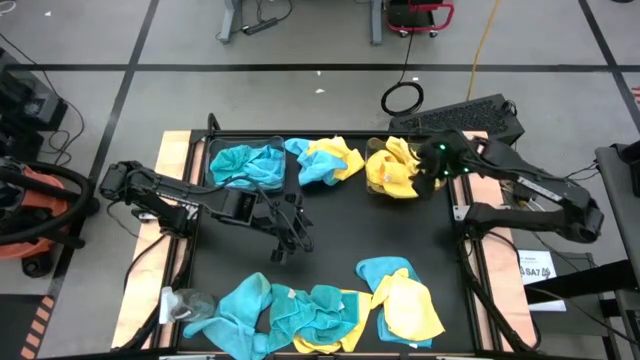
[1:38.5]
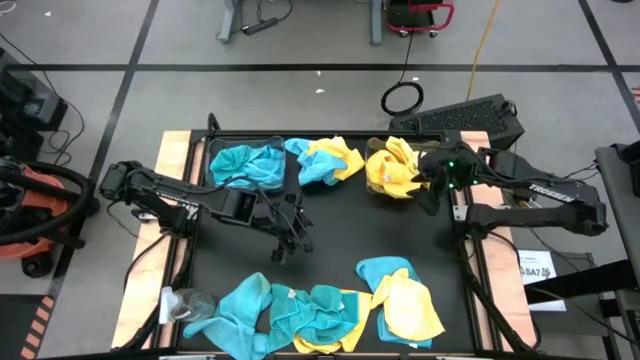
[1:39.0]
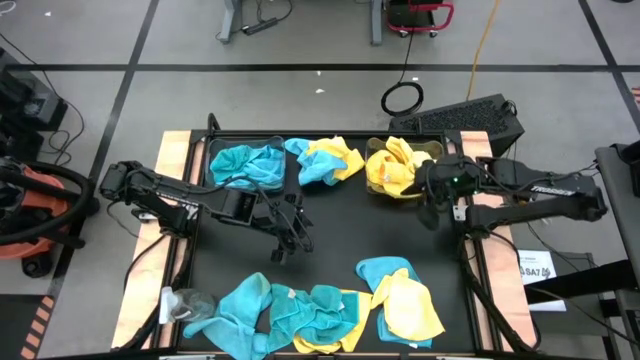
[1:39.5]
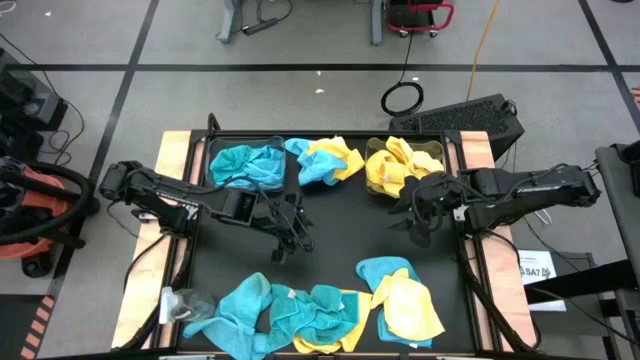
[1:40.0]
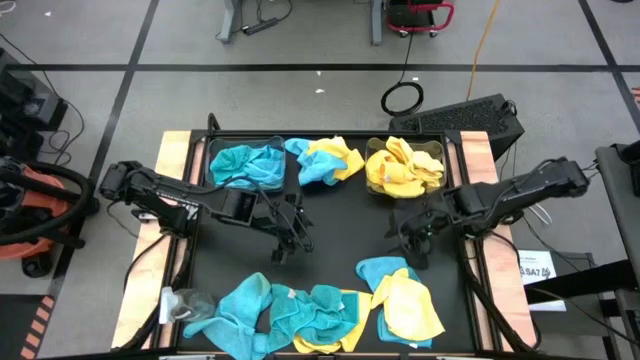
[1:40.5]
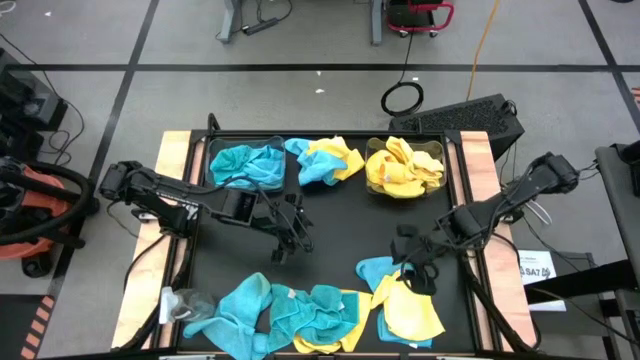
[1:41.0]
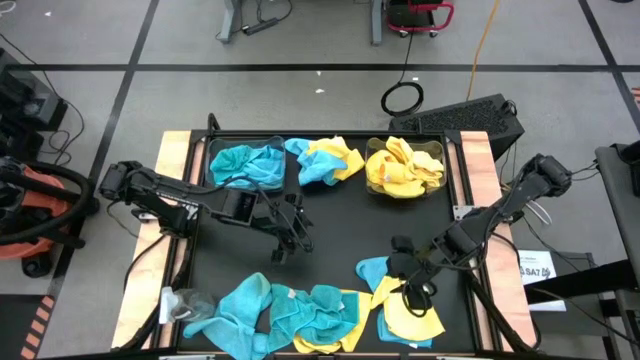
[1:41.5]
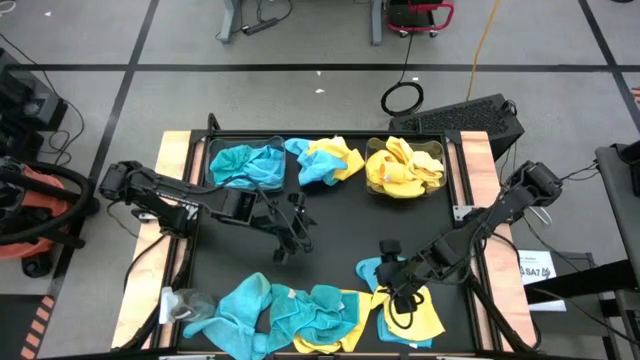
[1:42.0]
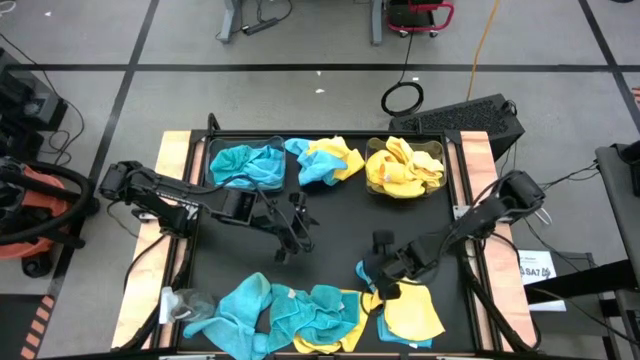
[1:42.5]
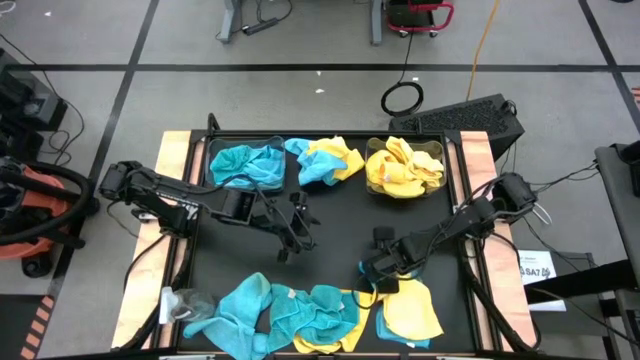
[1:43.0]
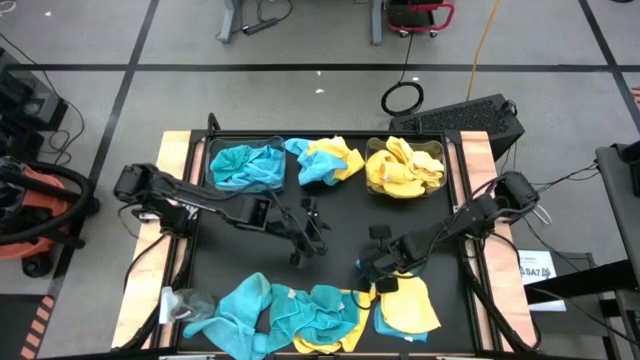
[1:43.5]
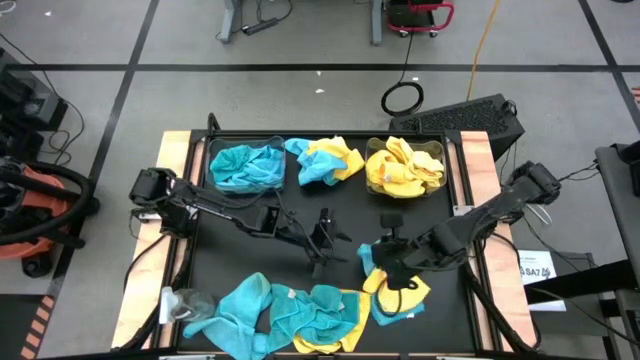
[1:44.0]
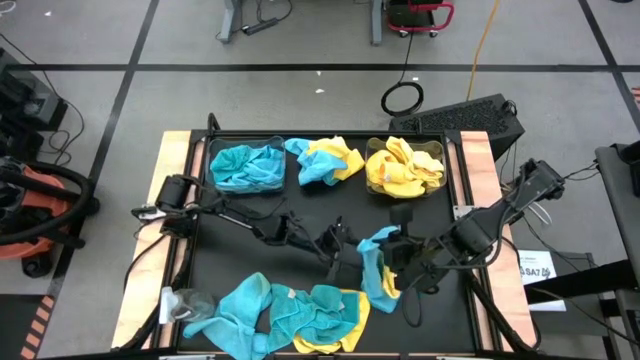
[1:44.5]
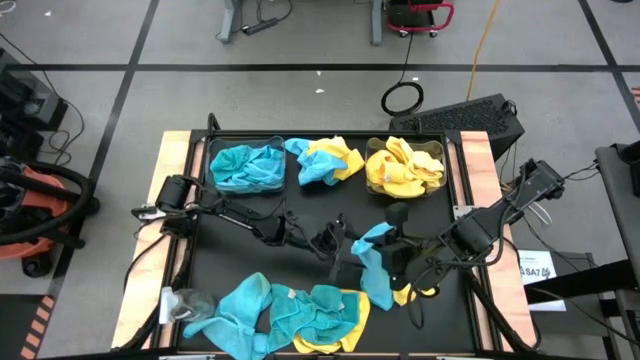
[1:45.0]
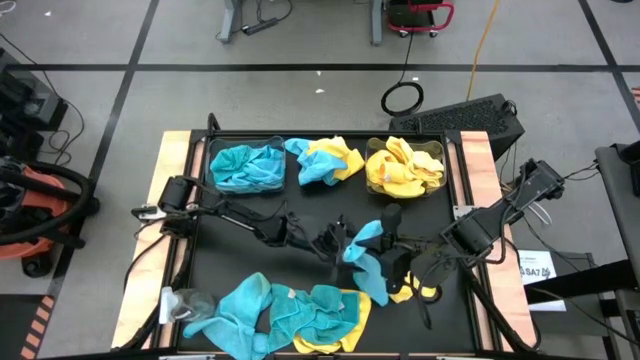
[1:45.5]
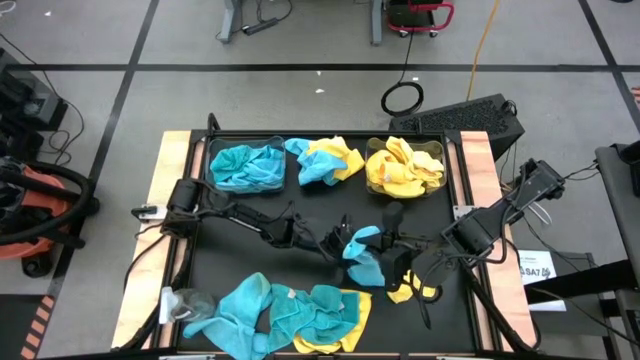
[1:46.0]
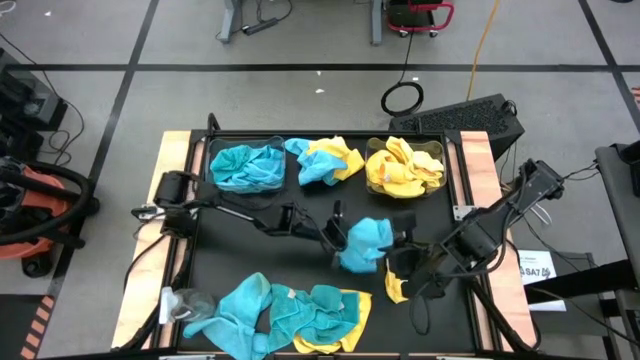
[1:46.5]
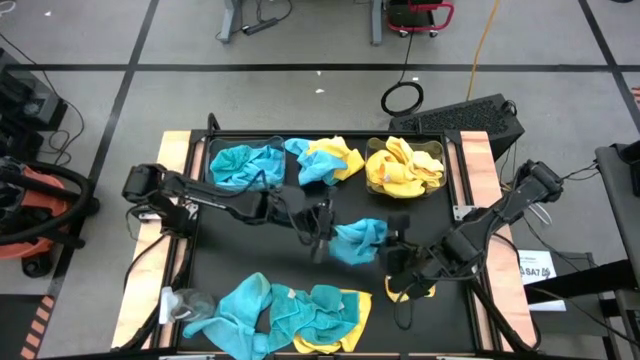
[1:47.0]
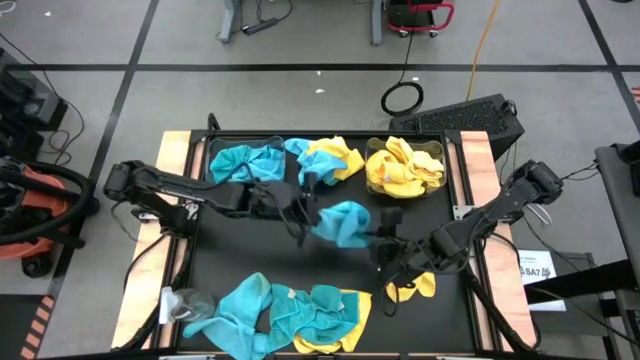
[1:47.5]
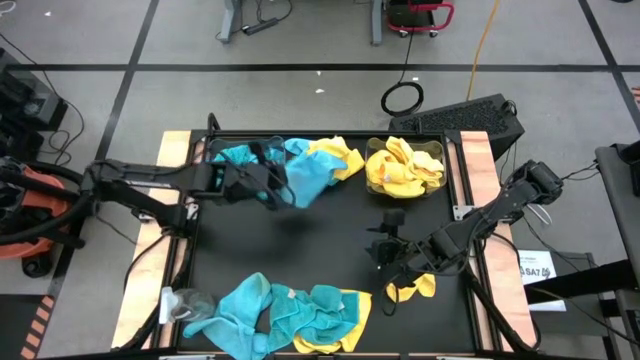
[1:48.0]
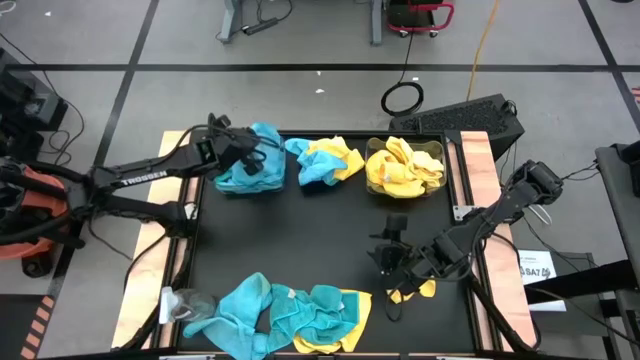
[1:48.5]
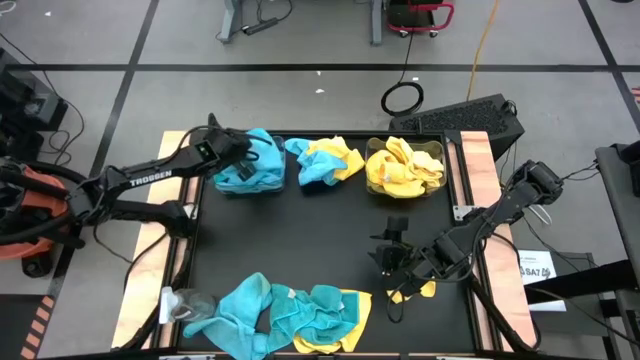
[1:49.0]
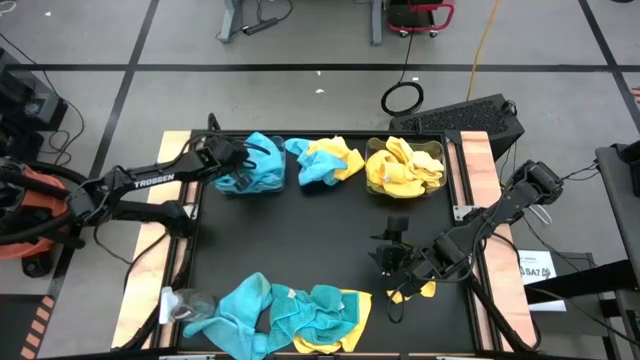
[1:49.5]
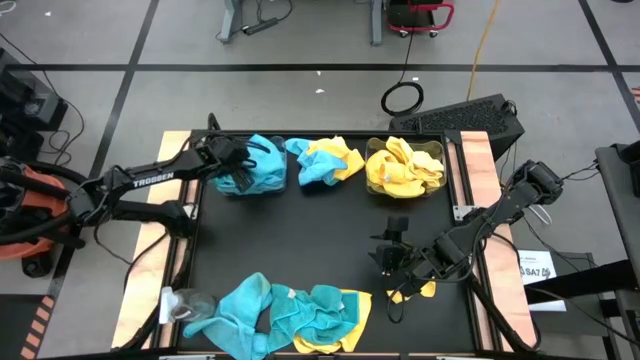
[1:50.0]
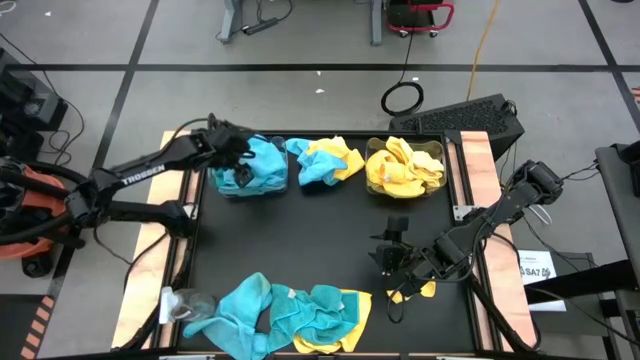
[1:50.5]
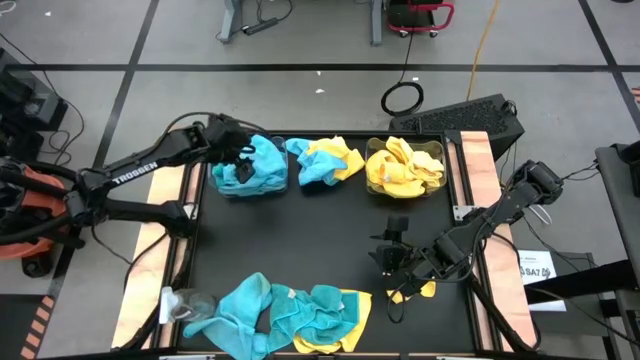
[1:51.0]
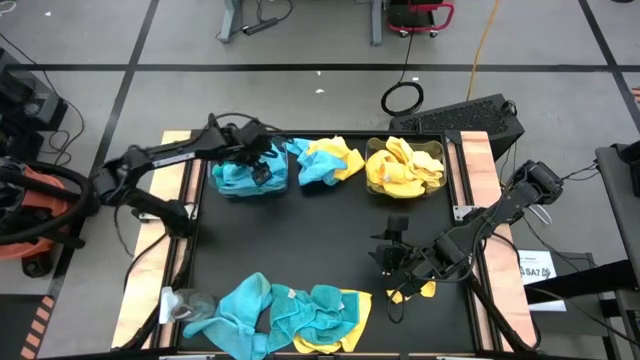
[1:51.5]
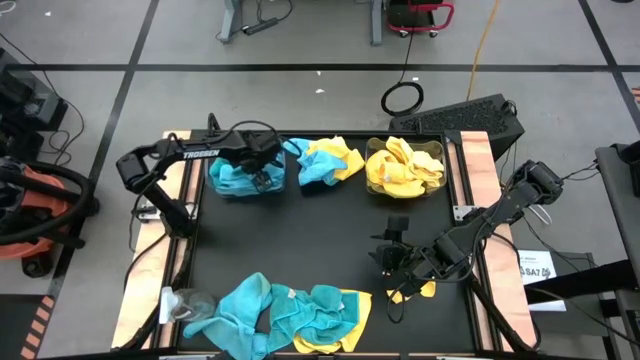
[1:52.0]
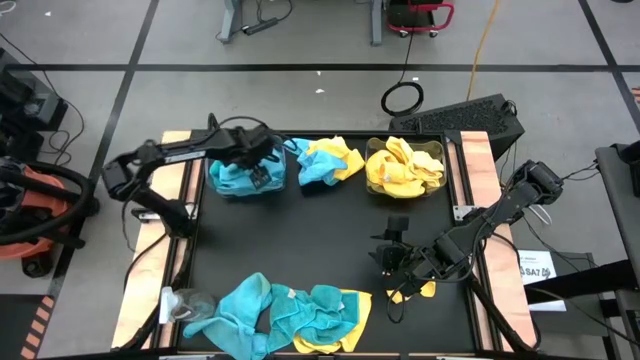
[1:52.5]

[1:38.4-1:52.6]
Task: Sort microfiber towel by color & place in baskets
Put the blue microfiber cloth into the left transparent bin

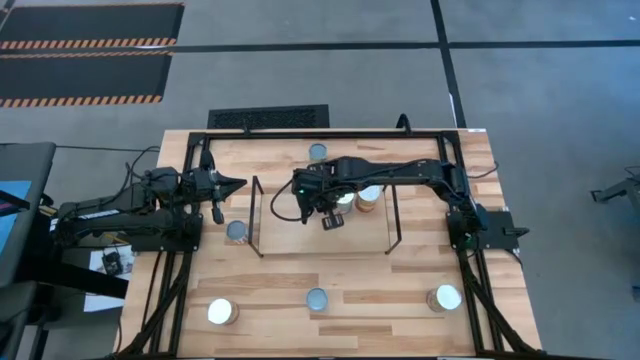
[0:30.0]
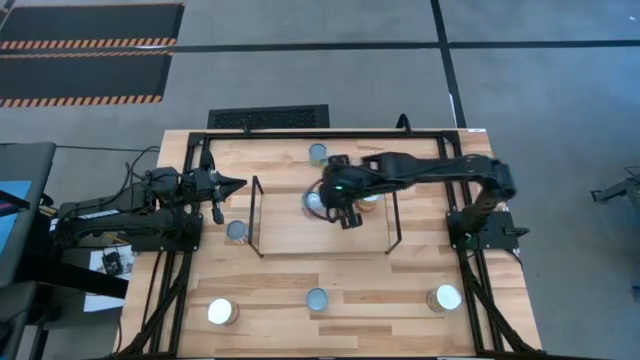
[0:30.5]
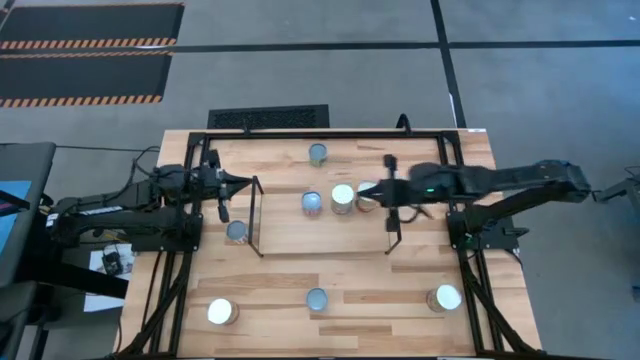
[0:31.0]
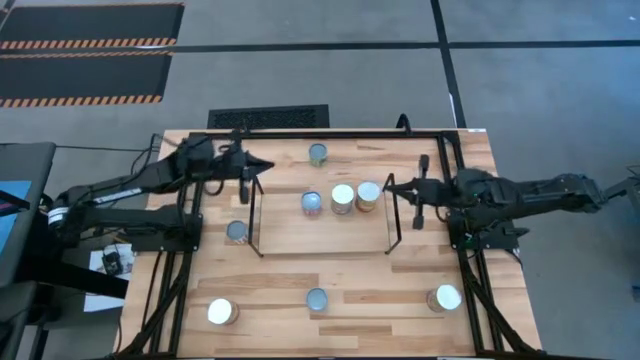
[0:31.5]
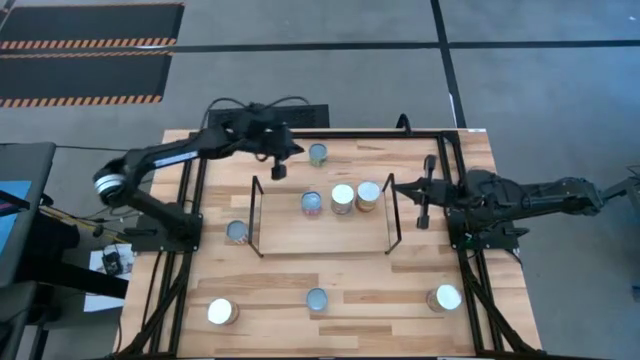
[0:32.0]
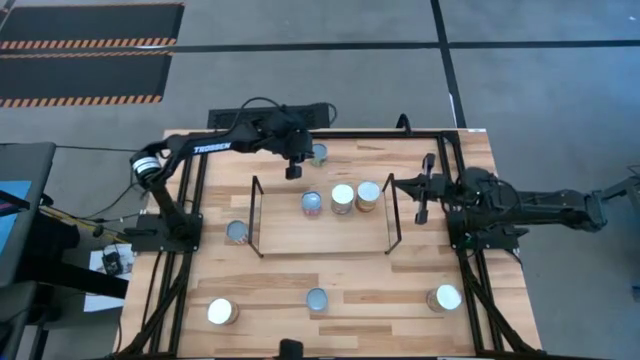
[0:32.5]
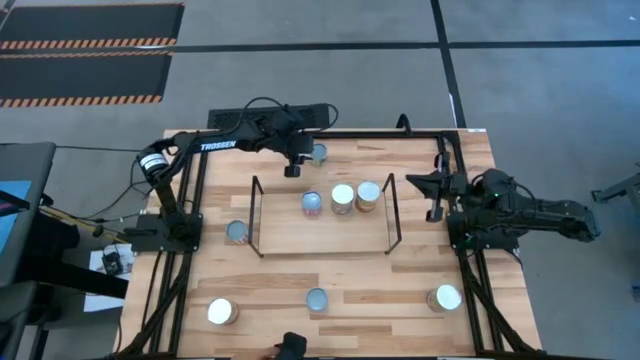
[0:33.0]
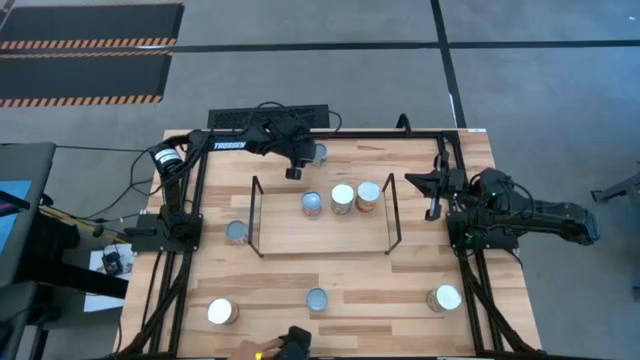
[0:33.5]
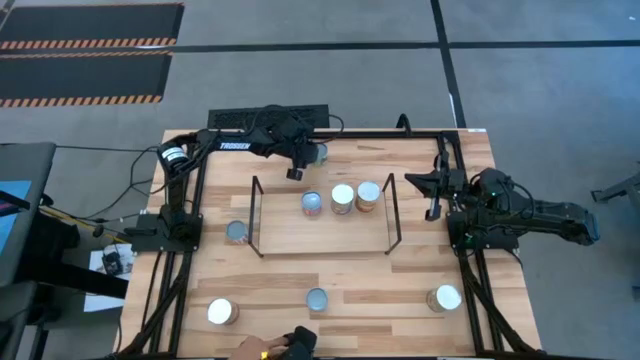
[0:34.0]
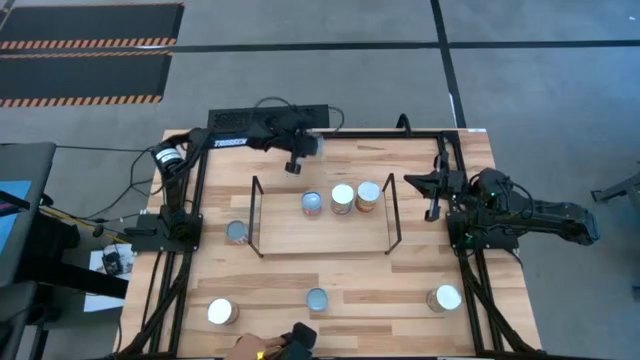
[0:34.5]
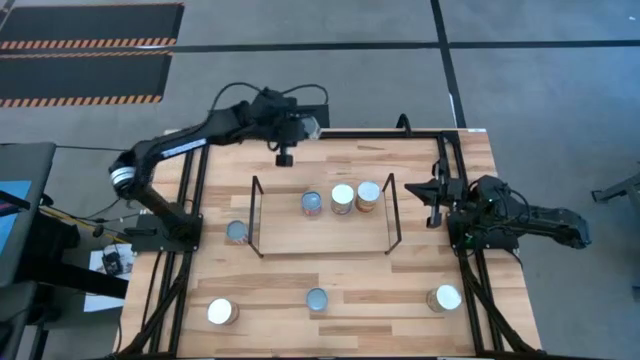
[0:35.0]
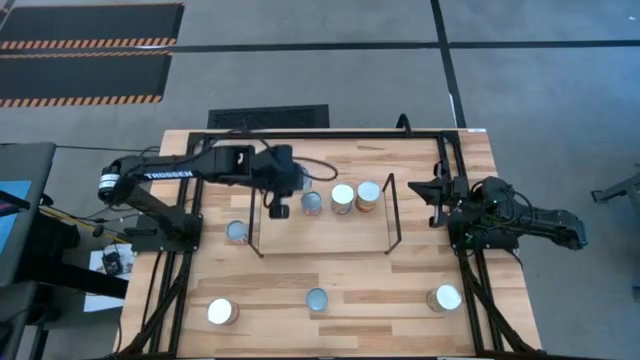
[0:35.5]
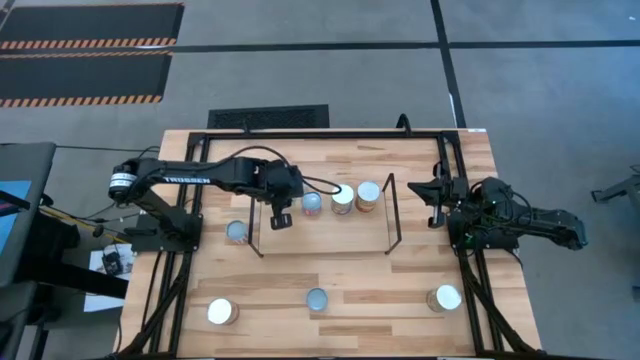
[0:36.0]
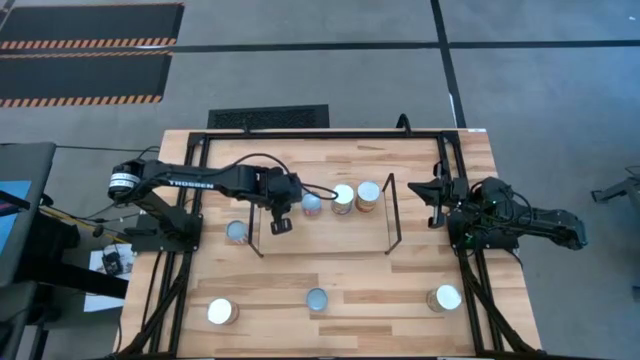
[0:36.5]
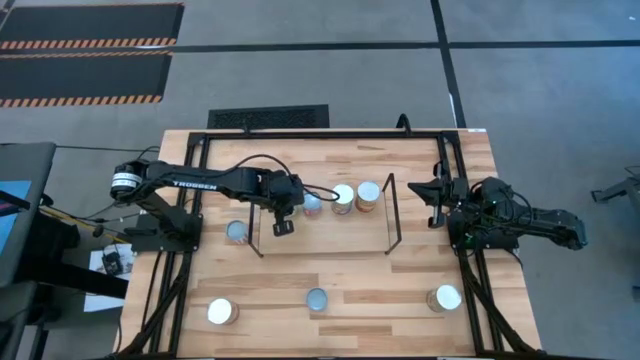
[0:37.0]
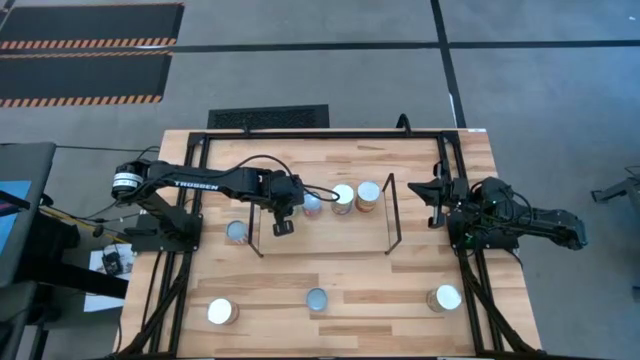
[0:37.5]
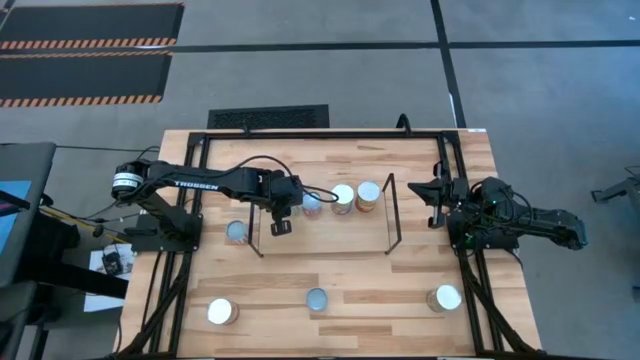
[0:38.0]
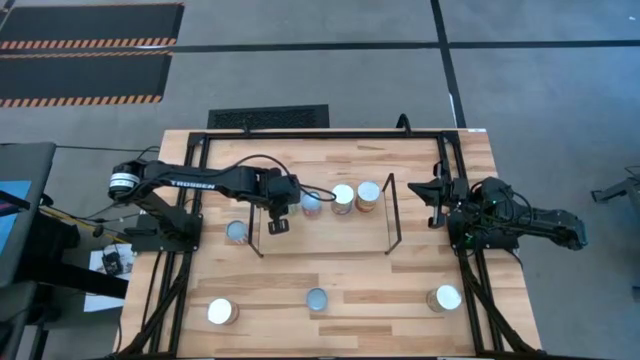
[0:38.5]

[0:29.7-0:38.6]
Task: Pick and place cans onto a shelf
Put the canned green peas on the shelf
